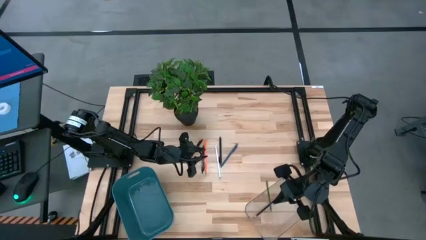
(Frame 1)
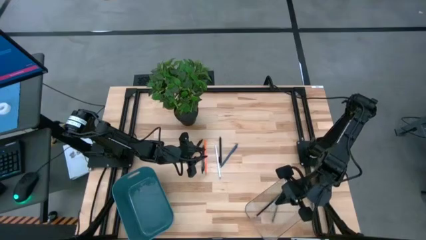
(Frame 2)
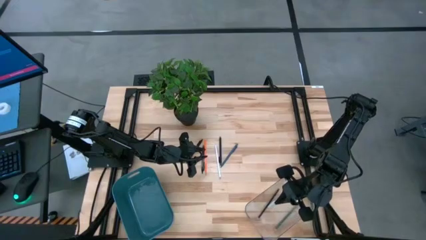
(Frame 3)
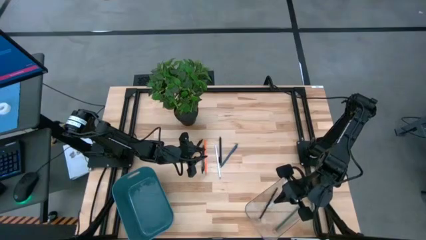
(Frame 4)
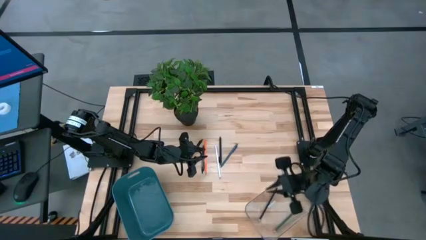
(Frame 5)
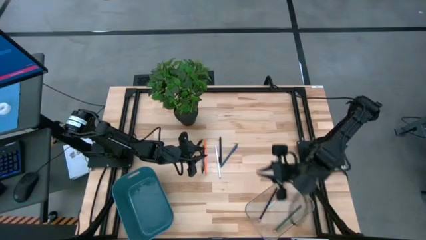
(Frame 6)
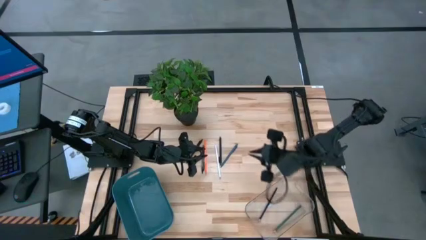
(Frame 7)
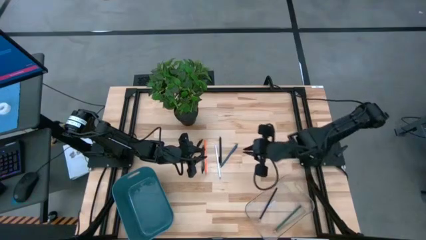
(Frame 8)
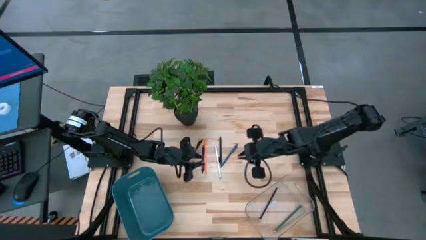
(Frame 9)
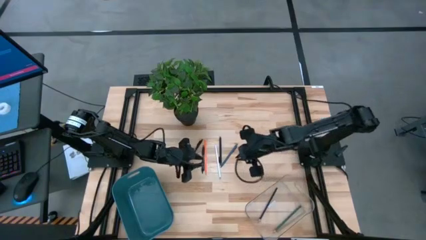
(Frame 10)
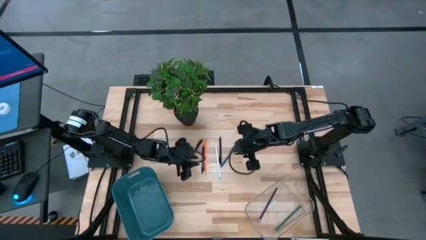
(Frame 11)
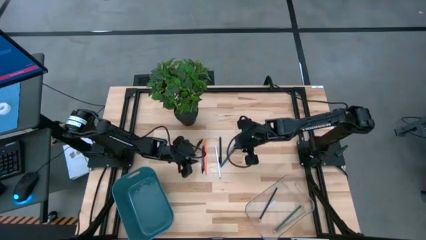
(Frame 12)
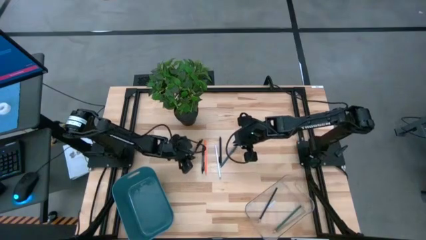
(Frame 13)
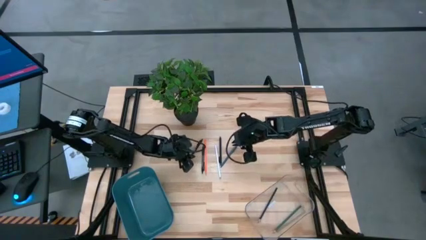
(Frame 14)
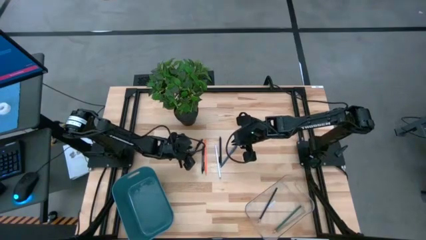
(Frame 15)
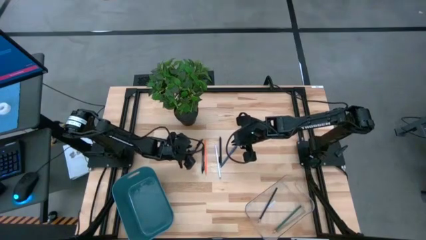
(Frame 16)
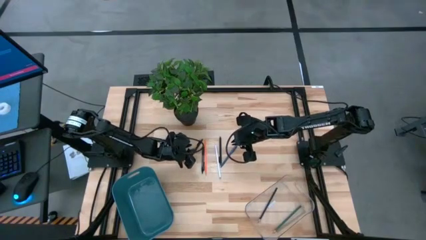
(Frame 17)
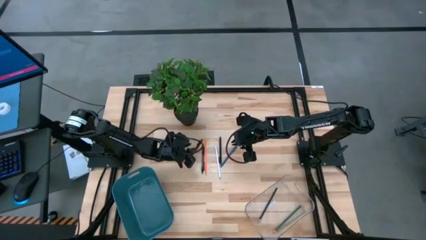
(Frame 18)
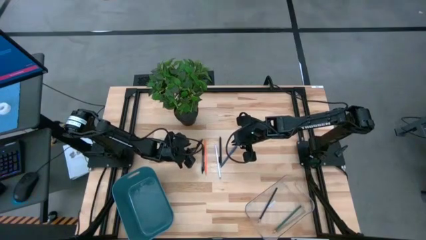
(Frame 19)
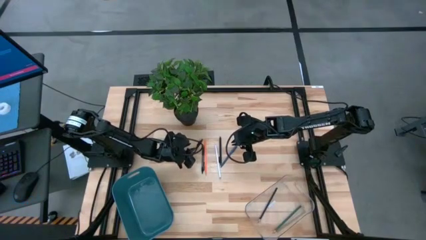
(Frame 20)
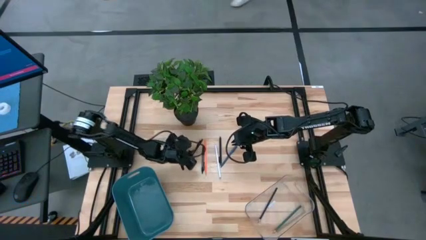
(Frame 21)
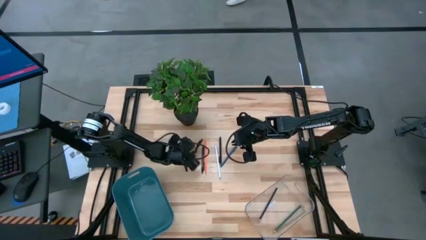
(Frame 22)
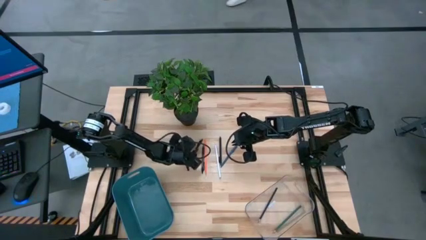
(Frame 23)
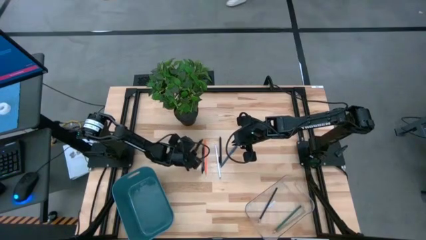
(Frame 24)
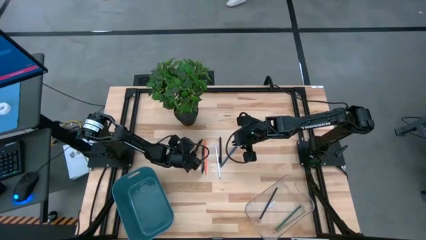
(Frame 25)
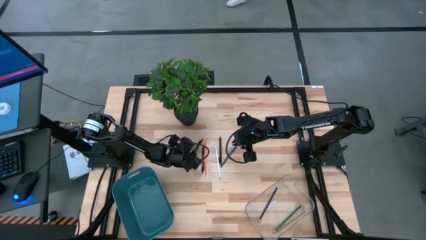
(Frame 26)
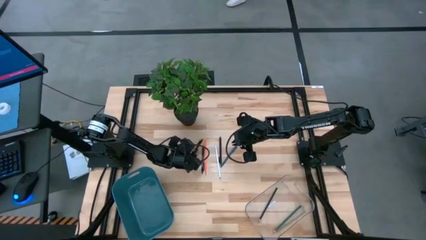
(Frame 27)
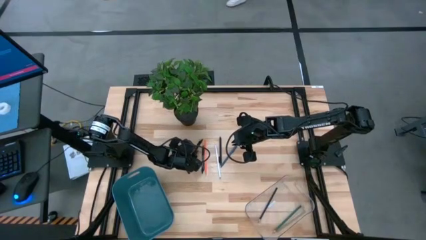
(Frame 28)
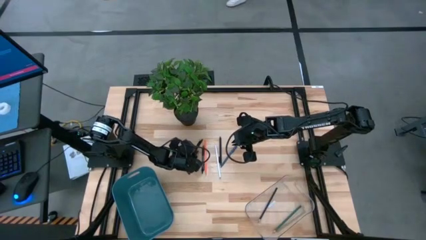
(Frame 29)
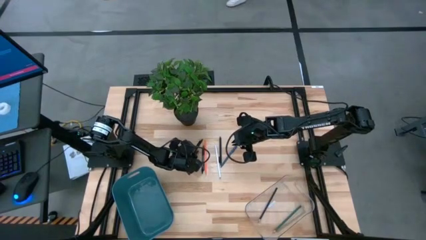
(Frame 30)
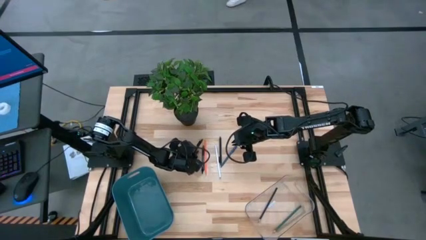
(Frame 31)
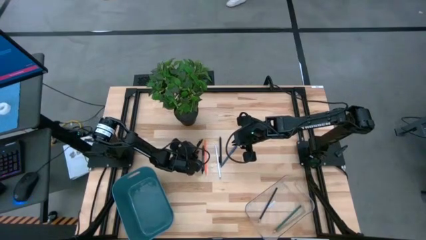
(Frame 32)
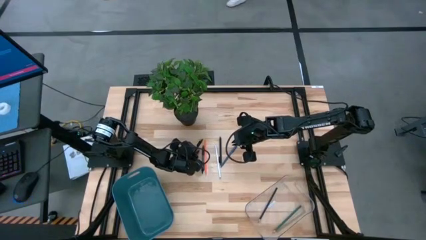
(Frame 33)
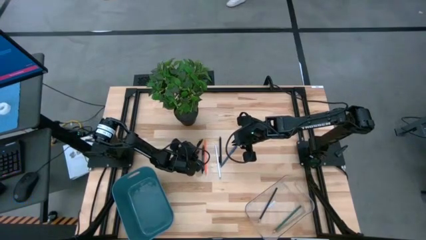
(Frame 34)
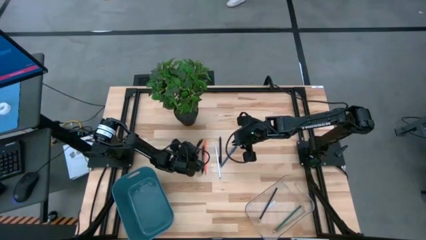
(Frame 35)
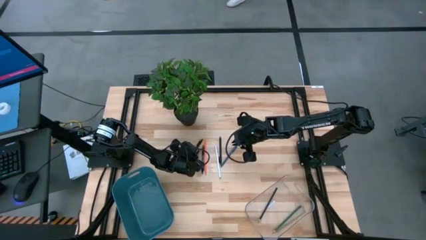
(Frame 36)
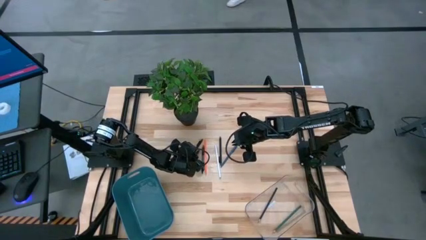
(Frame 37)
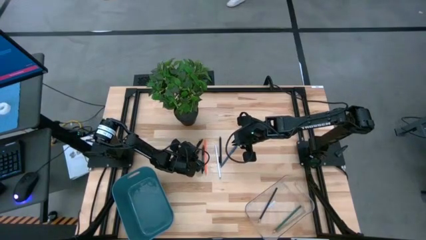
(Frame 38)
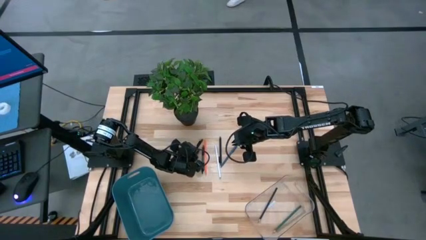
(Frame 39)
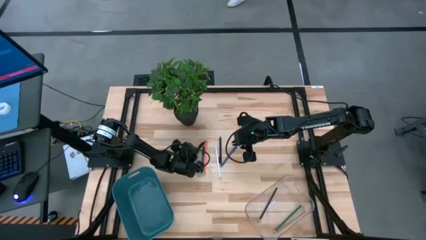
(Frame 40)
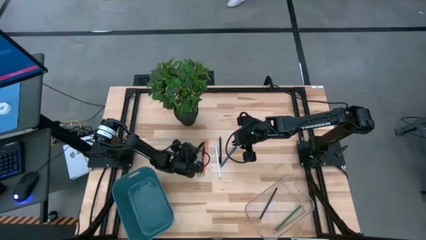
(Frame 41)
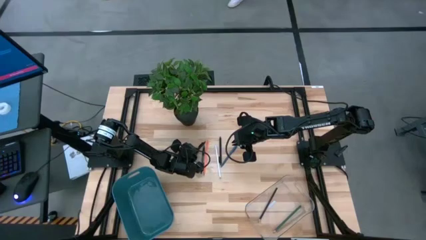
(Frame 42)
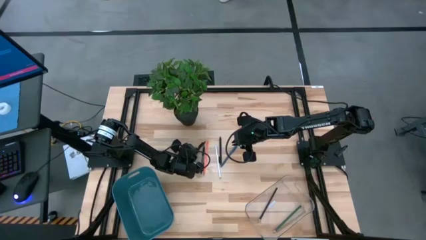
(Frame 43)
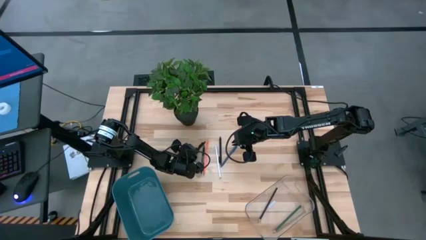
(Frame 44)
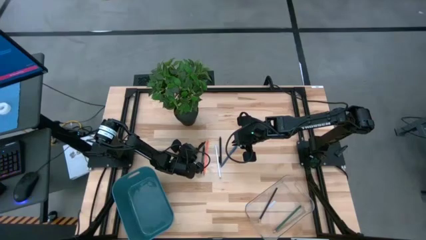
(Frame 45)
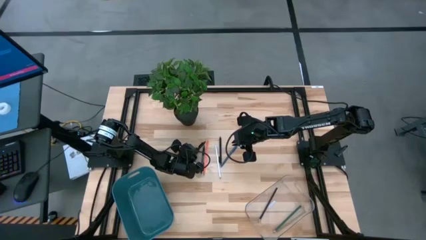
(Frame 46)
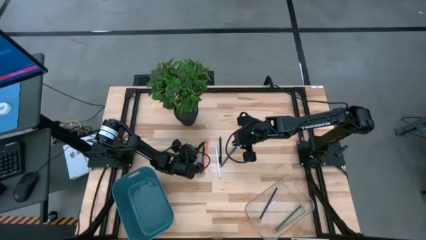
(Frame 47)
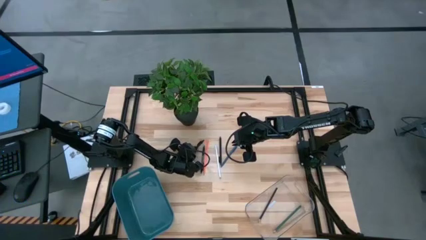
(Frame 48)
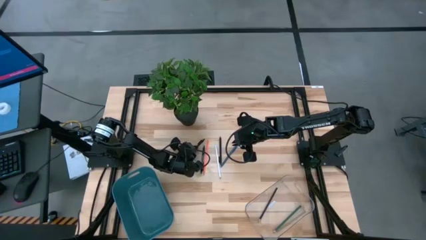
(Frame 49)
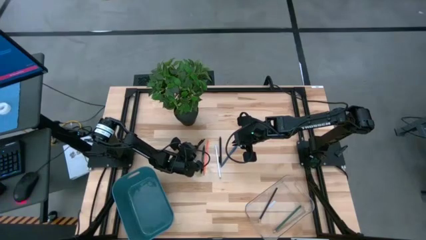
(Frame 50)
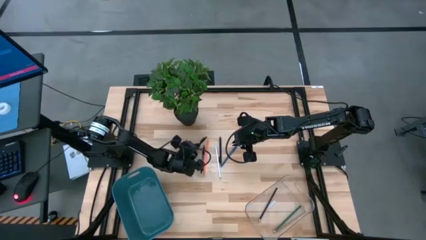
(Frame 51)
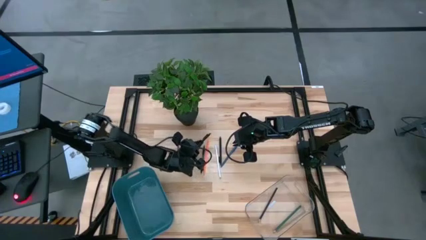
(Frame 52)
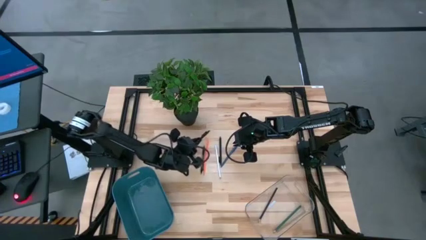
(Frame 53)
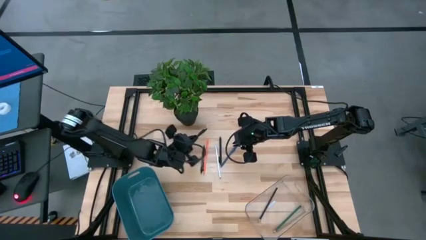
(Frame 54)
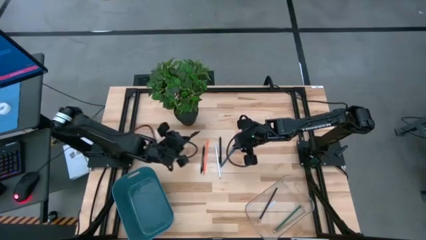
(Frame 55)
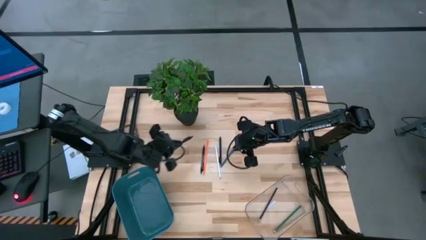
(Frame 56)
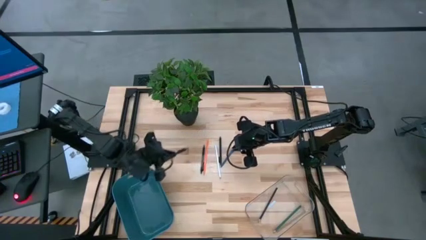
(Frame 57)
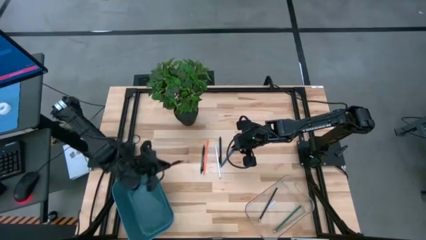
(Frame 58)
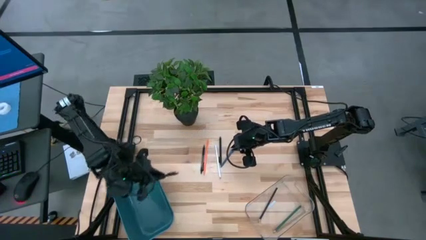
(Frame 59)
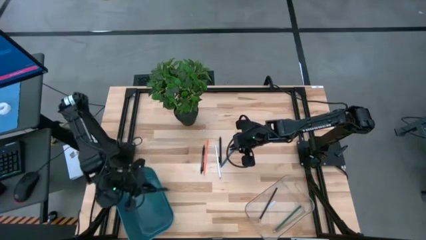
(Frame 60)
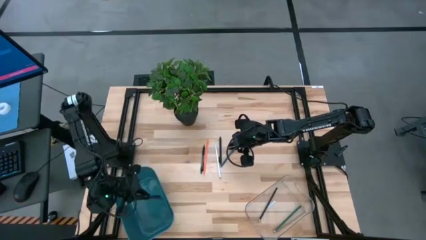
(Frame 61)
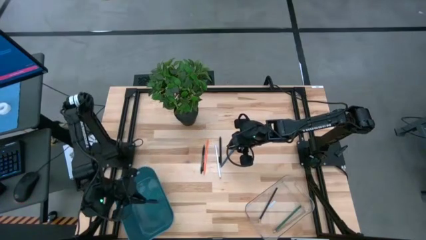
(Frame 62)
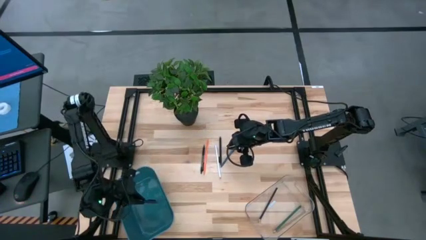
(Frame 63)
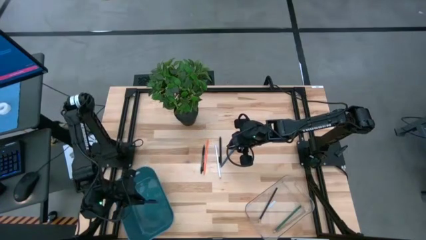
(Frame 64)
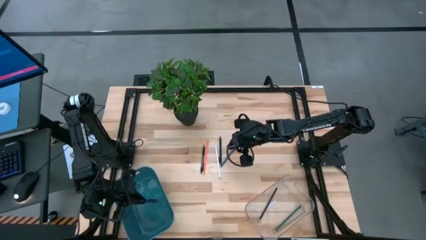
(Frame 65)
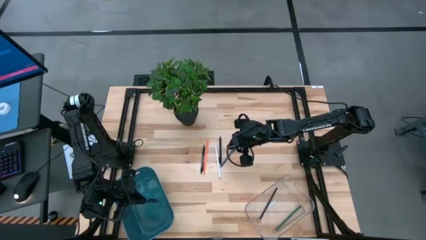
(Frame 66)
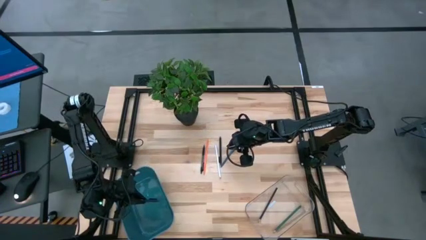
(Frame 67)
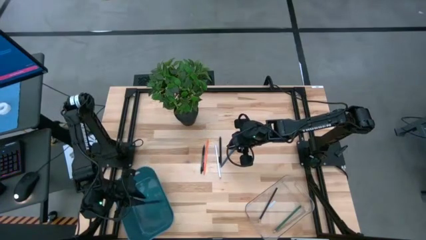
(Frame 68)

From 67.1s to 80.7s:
Task: Sort pens & pencils
Put the left black pen into the blue bin

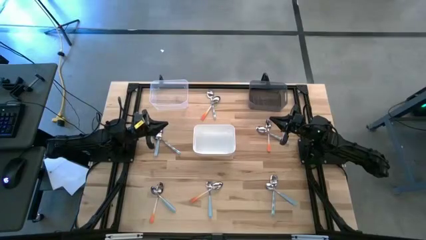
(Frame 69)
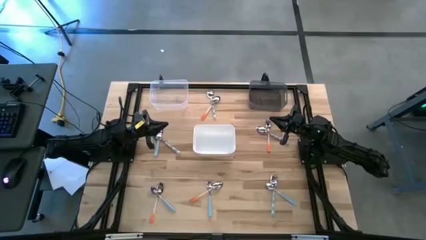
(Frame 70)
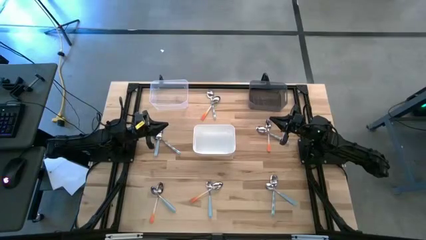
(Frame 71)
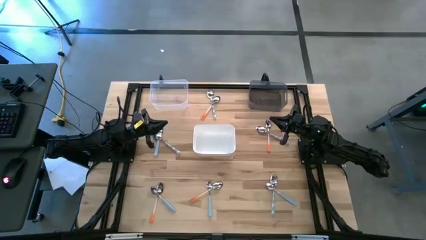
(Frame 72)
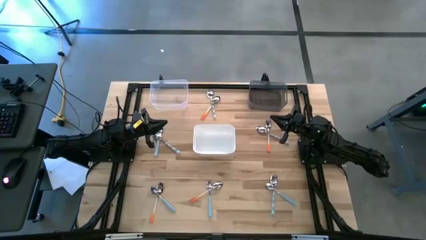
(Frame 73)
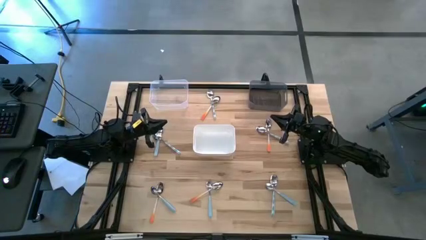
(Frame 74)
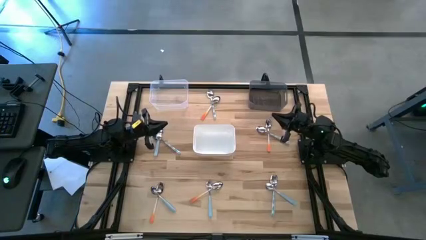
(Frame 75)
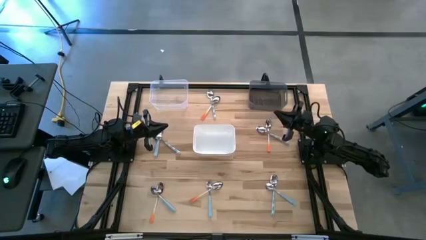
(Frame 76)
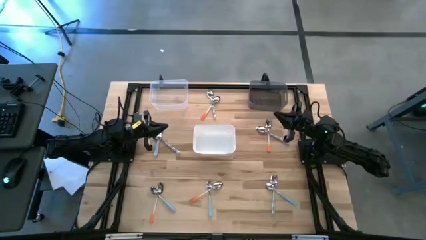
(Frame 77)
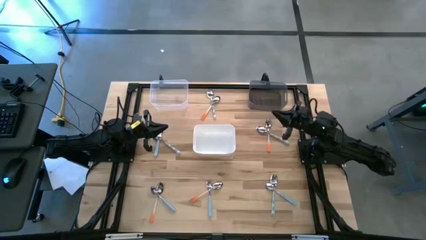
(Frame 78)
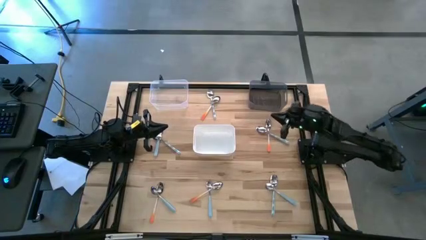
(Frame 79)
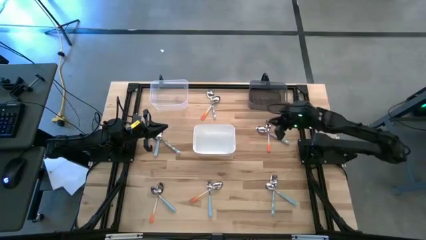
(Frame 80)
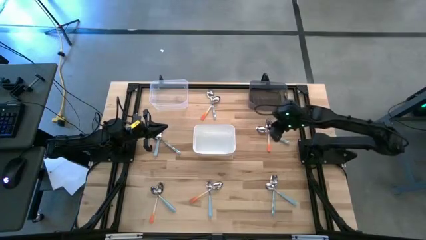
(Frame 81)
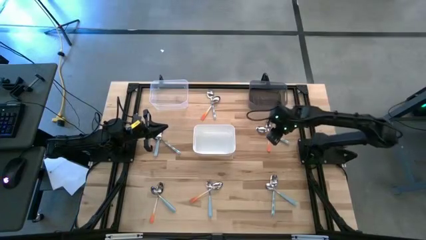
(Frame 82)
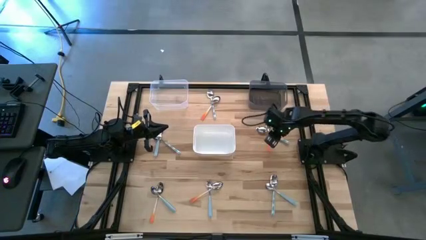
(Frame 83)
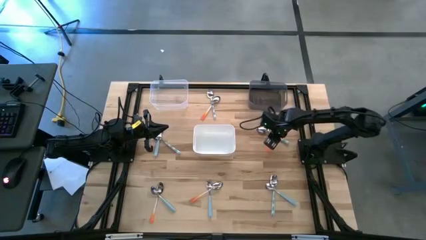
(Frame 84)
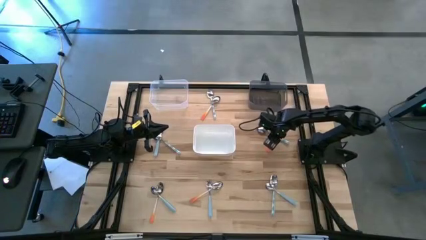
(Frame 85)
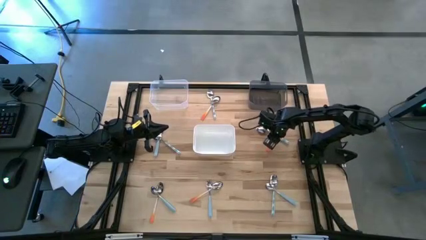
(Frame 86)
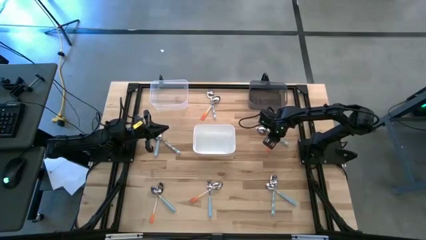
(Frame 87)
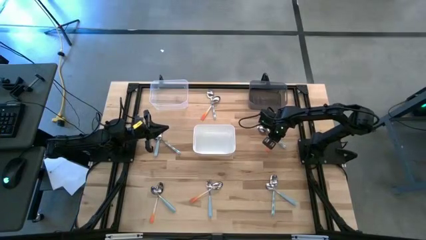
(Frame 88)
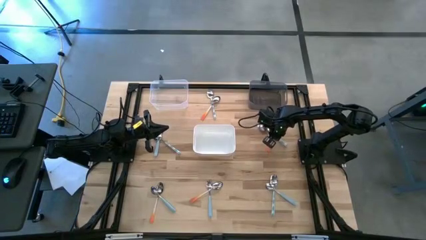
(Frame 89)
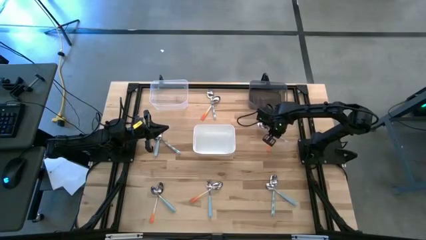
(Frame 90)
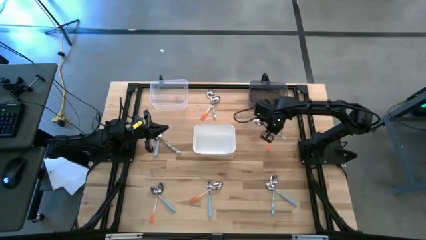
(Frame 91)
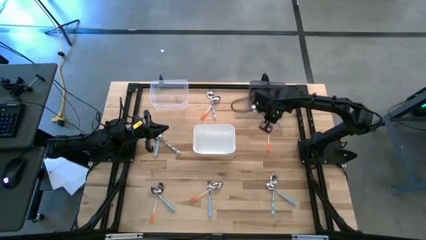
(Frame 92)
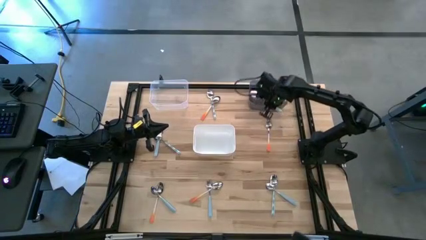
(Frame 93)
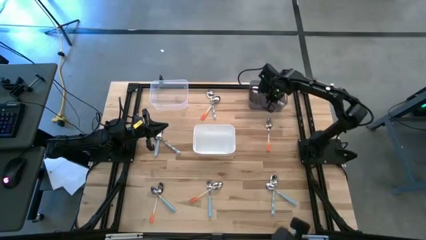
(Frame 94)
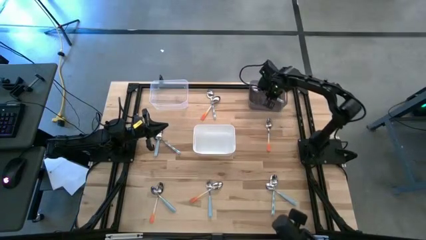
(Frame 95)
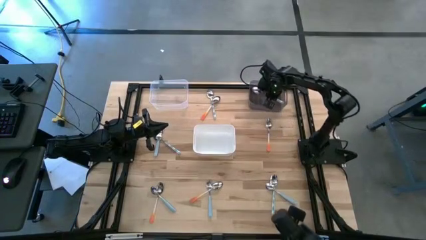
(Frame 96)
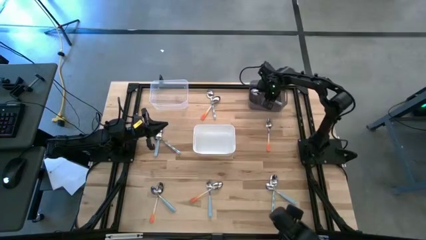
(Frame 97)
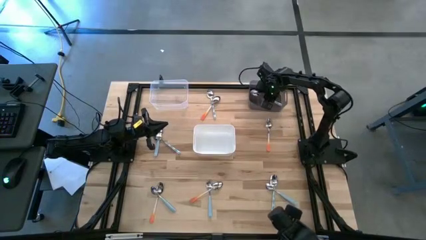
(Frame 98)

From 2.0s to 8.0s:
Task: Sort silverware by color (type)
Put the blue patterned spoon into the black bin
